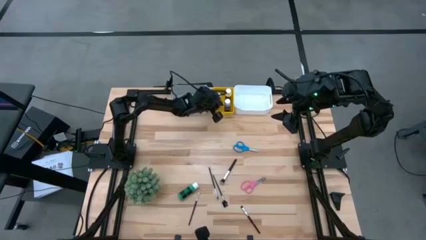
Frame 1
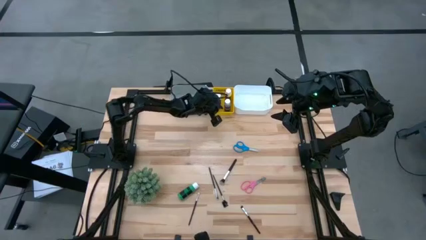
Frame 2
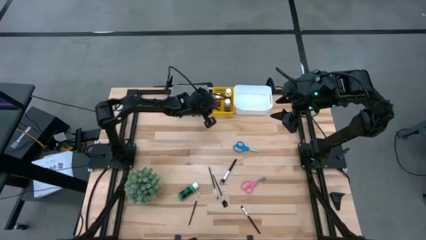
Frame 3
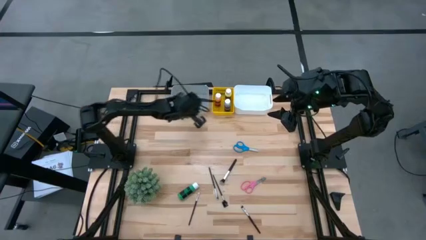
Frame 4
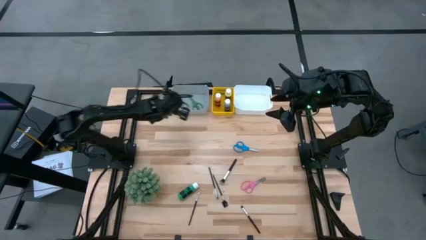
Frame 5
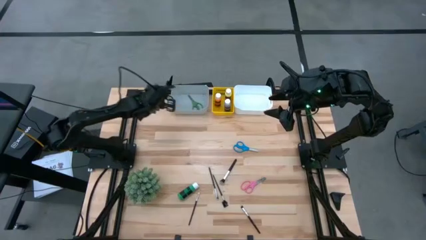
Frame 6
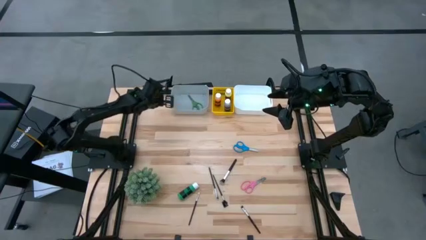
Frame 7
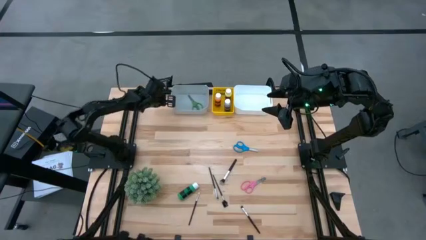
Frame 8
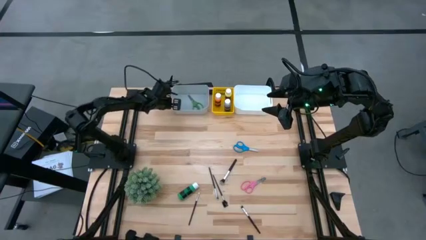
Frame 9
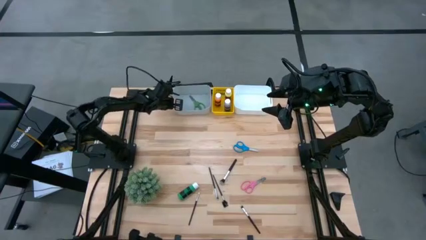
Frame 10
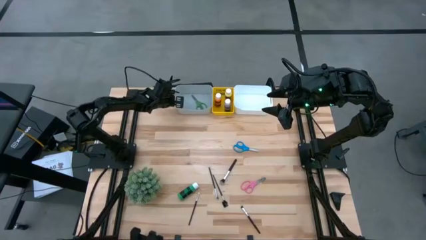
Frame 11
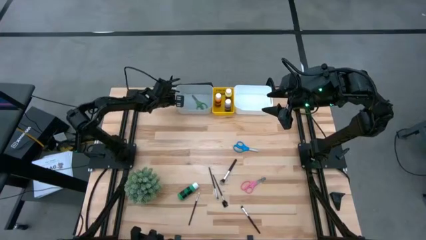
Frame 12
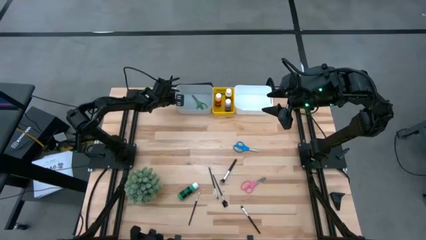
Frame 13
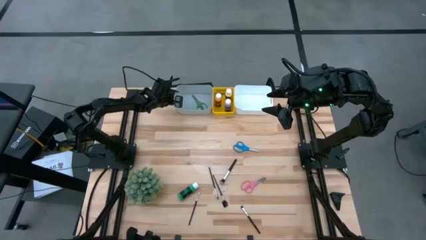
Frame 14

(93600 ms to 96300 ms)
Task: Pick & Place Paint Supplies
Adjust the gray bin

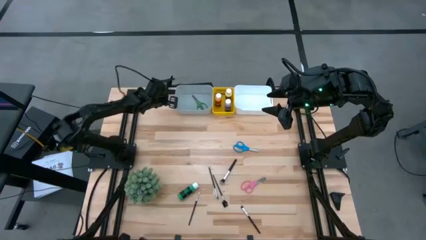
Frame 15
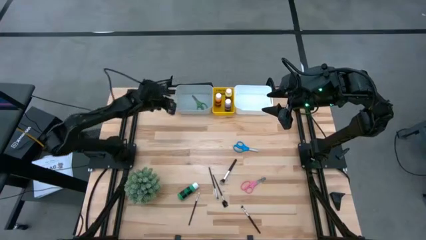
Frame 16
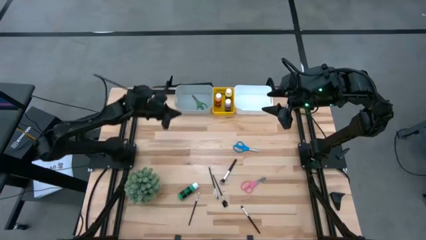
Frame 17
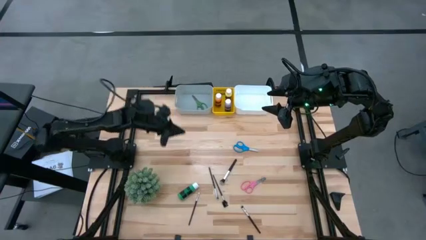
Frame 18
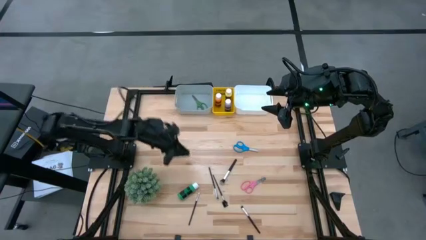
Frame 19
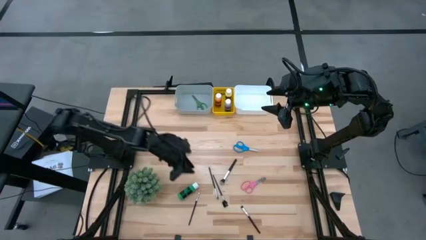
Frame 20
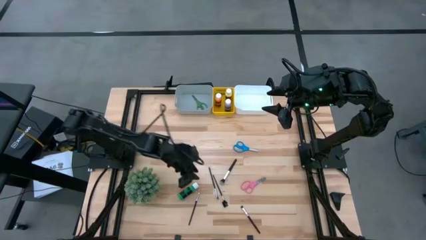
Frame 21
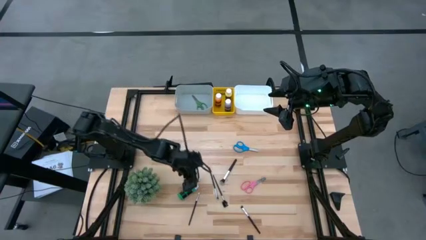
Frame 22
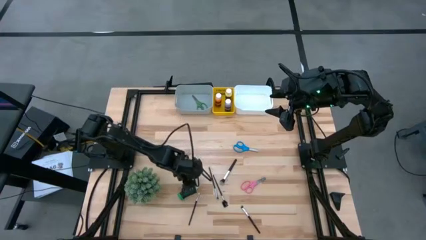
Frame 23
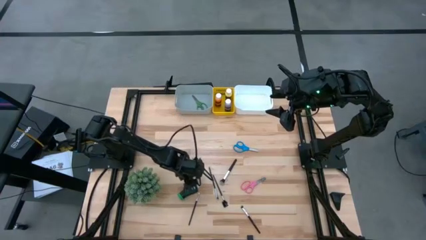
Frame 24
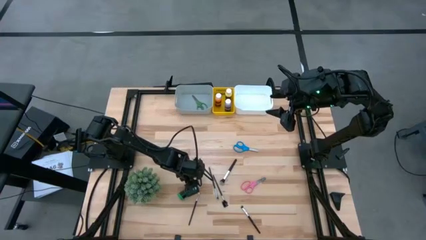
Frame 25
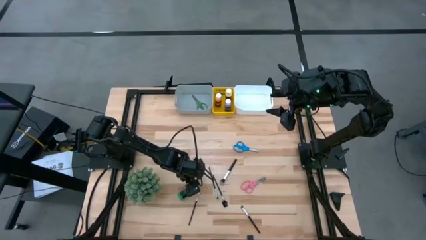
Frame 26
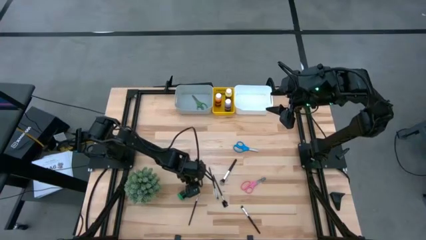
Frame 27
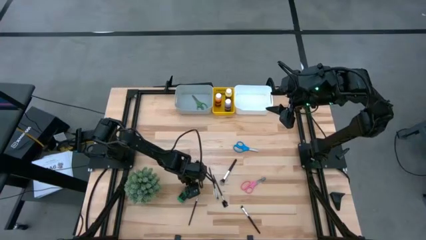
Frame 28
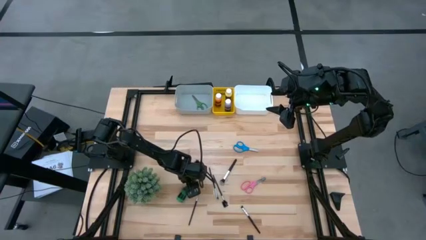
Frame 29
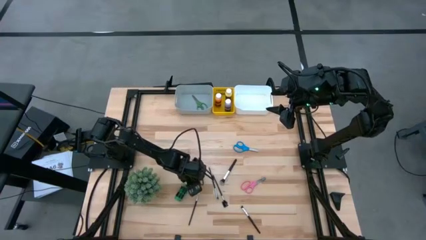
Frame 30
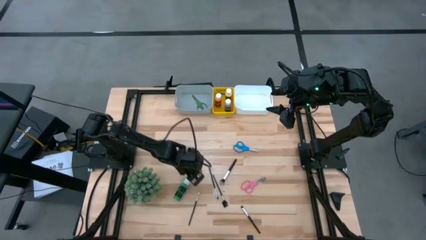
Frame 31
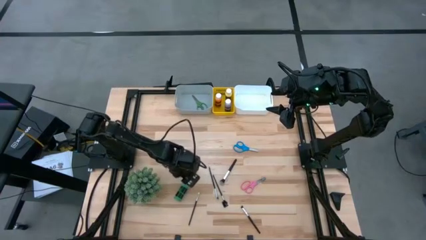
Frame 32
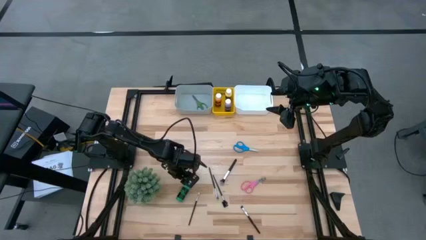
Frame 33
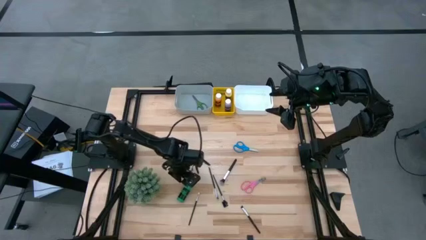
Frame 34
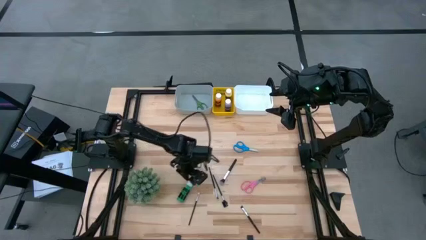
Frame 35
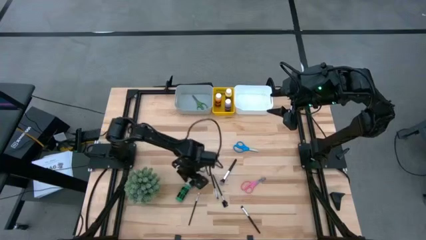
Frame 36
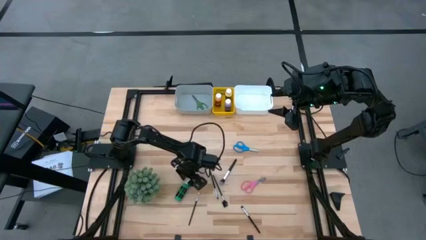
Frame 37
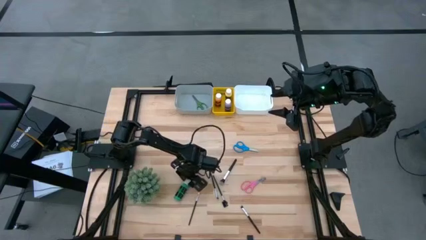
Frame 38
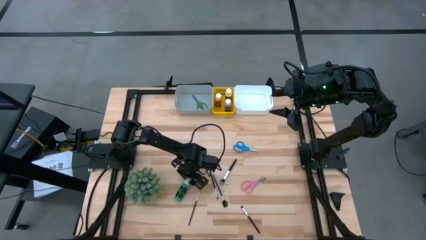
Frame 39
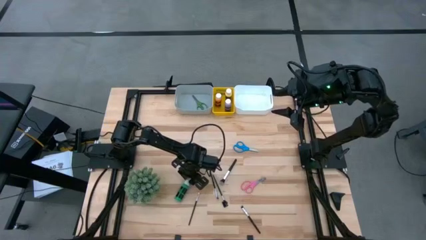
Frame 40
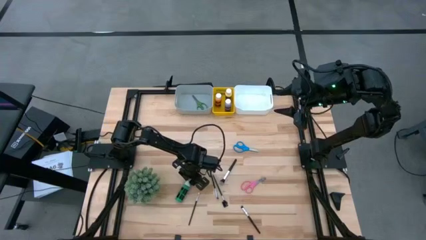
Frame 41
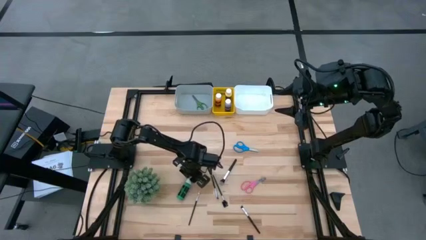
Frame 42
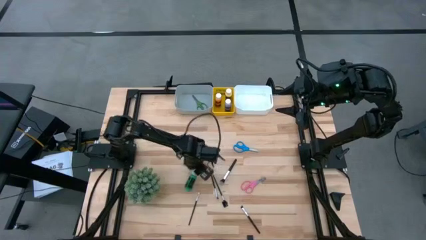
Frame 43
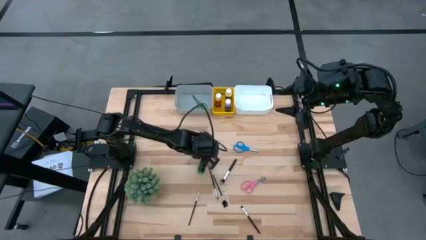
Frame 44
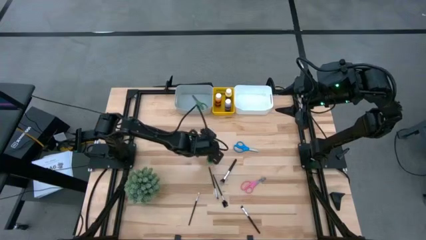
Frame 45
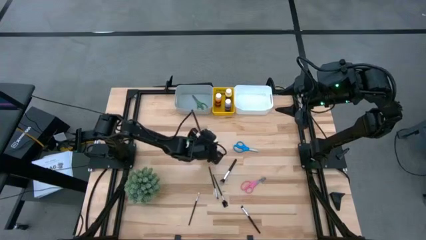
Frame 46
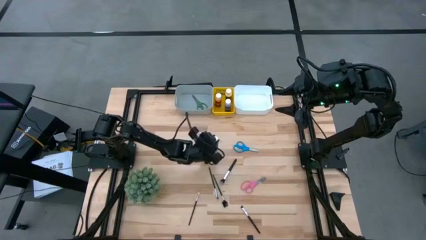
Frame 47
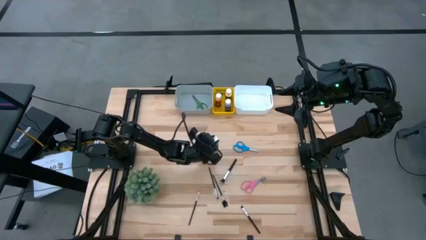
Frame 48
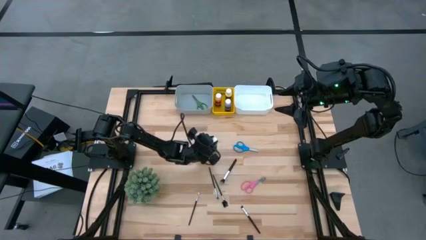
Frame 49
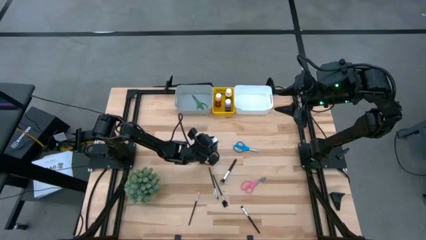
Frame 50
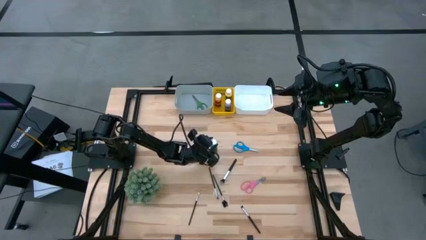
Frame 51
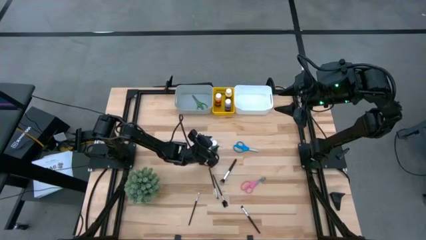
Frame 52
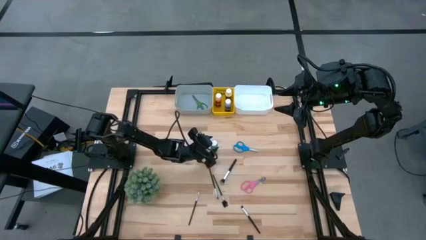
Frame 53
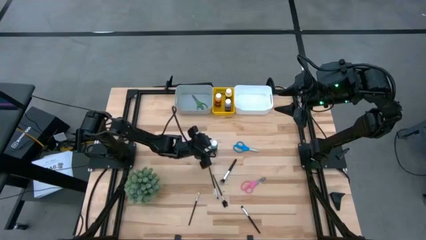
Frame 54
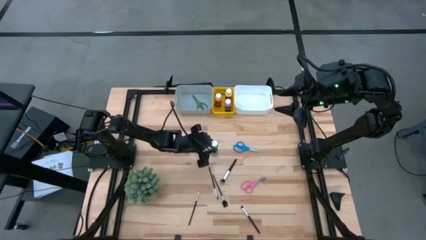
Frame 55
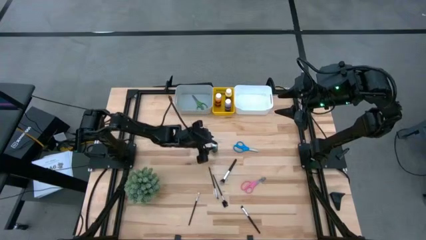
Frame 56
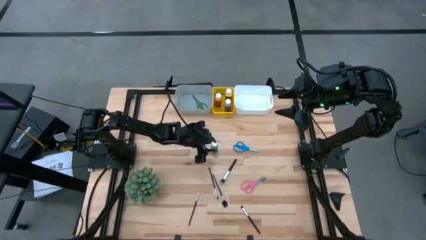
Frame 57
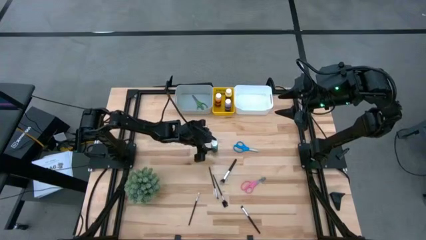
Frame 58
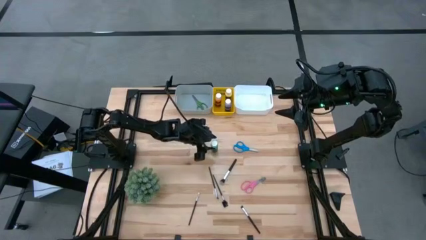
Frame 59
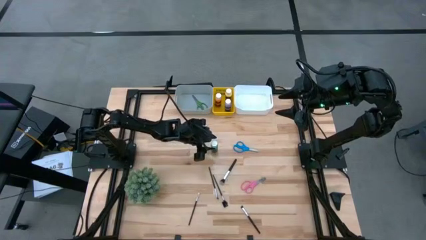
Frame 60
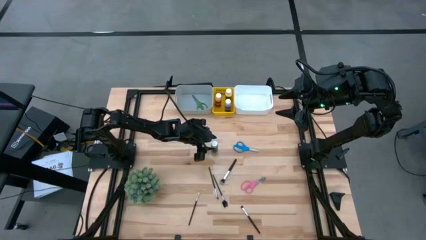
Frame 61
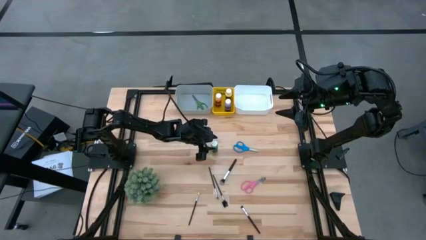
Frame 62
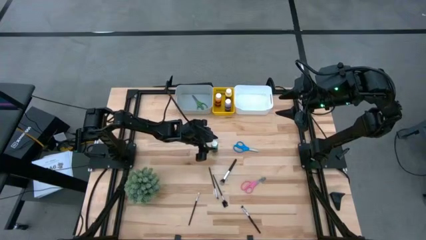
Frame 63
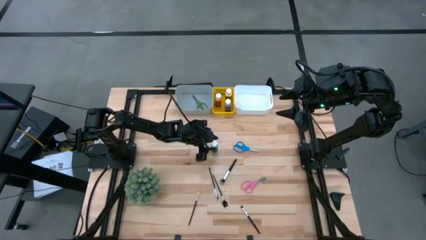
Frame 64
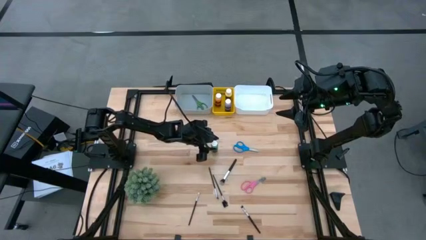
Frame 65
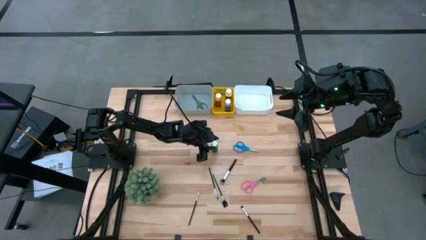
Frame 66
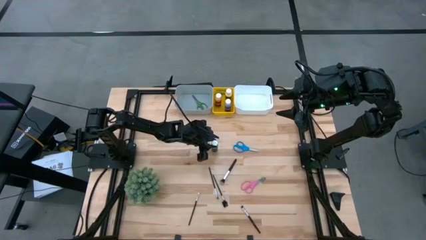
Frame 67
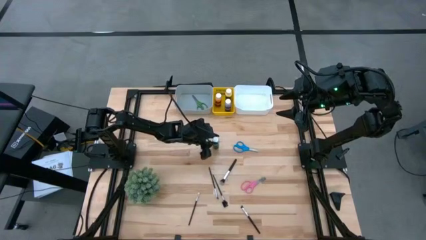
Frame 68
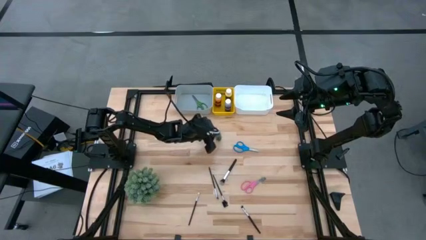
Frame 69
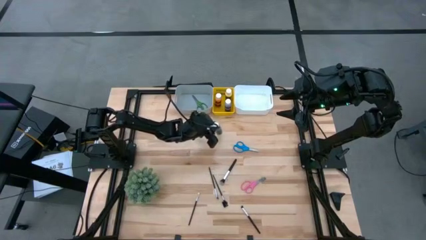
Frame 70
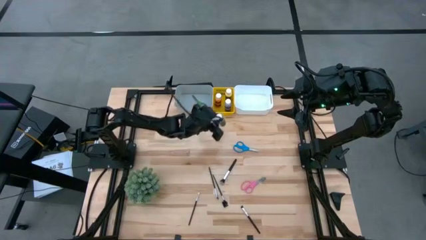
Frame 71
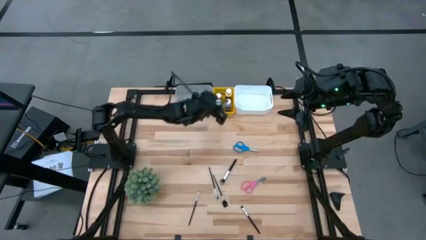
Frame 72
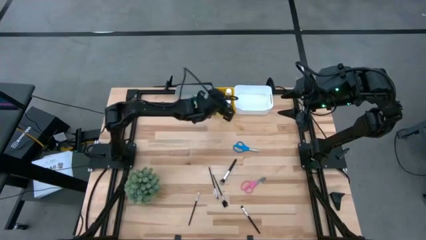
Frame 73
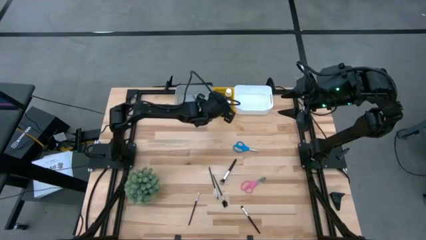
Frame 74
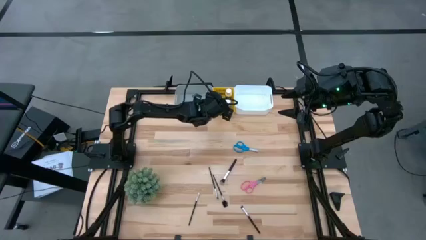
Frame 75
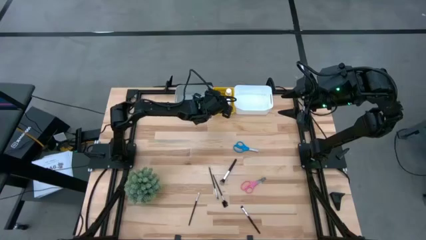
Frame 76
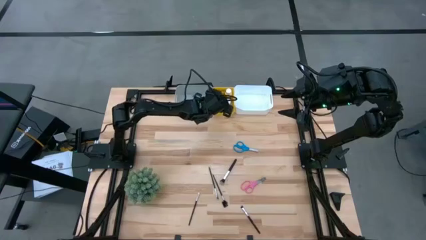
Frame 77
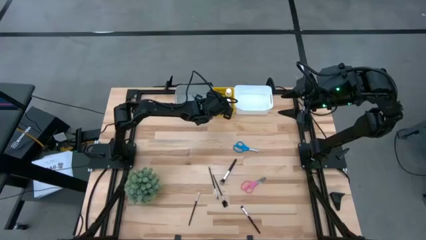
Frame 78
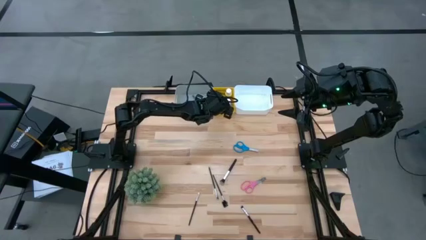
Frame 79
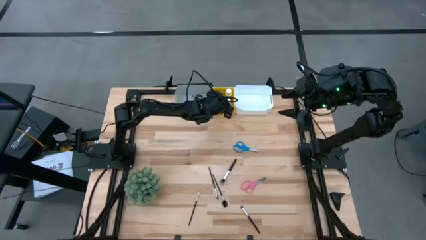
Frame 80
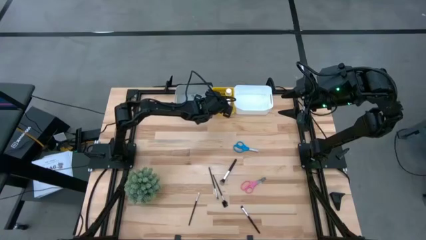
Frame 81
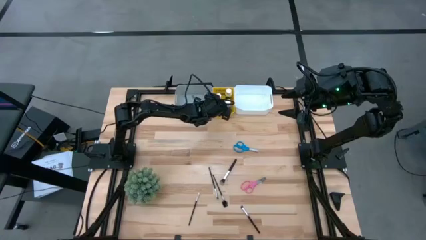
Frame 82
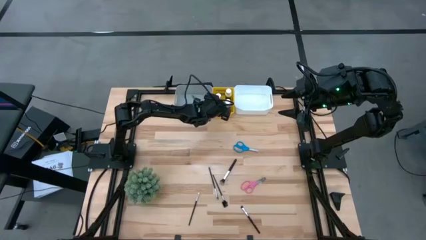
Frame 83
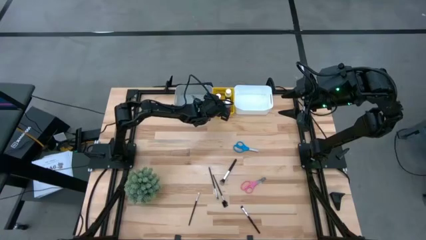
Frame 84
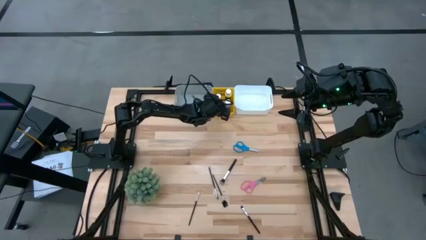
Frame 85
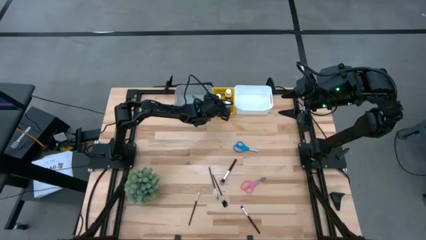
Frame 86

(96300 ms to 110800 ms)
Put the green paint bottle into the yellow bin
